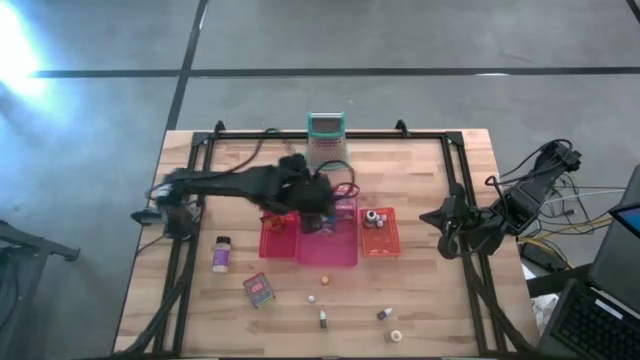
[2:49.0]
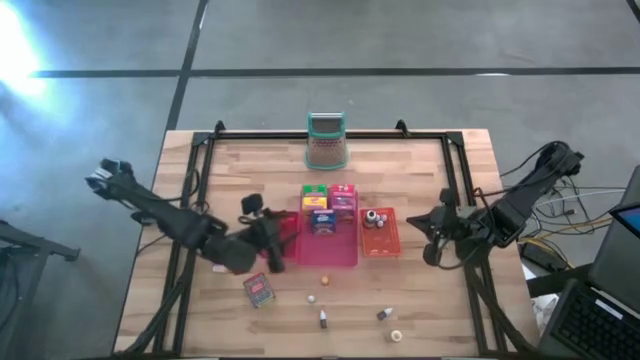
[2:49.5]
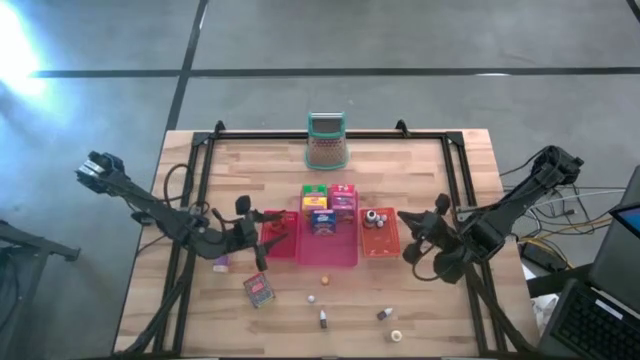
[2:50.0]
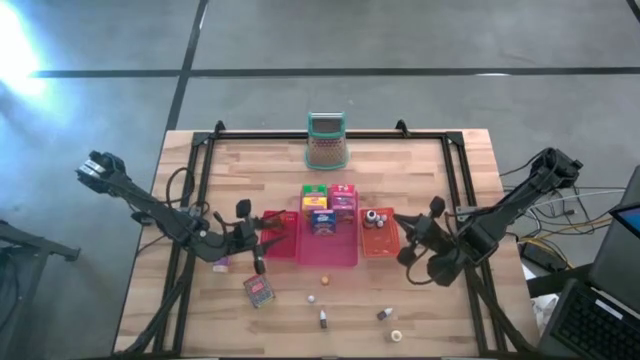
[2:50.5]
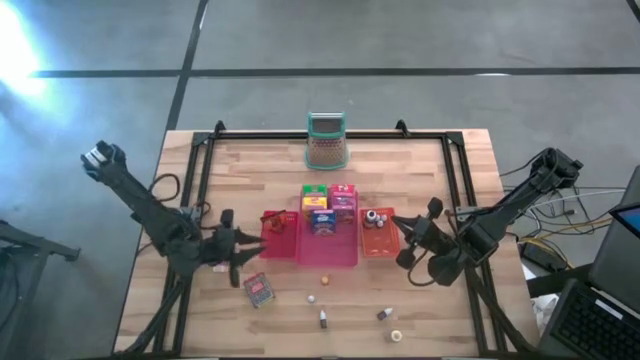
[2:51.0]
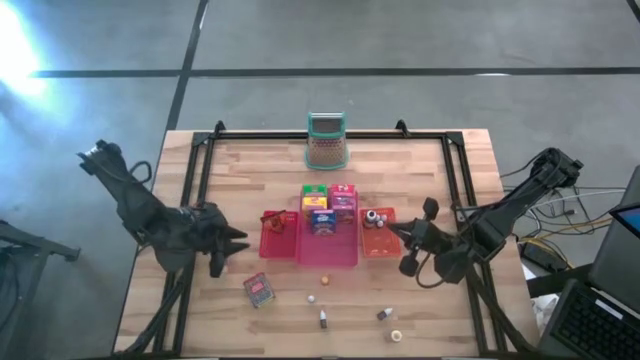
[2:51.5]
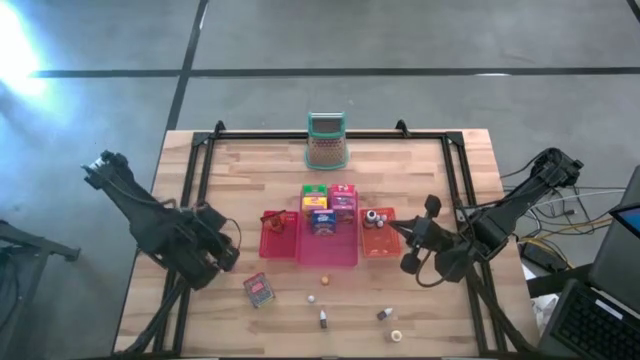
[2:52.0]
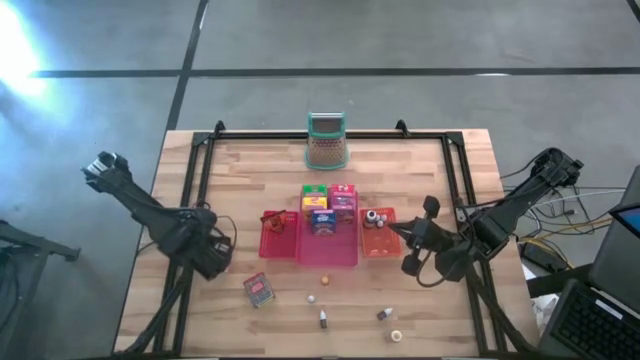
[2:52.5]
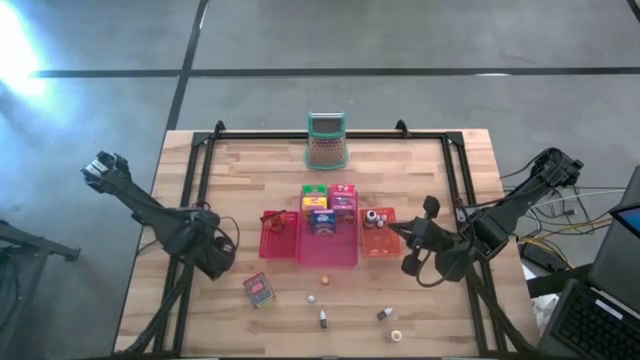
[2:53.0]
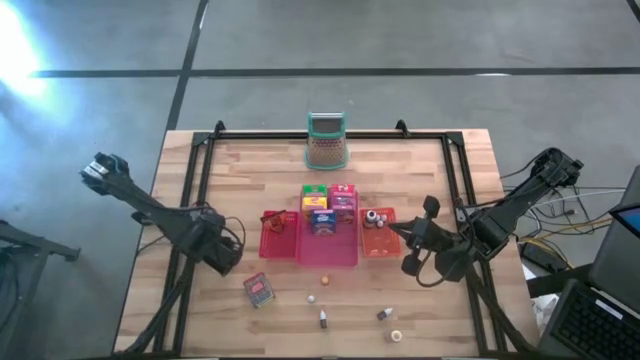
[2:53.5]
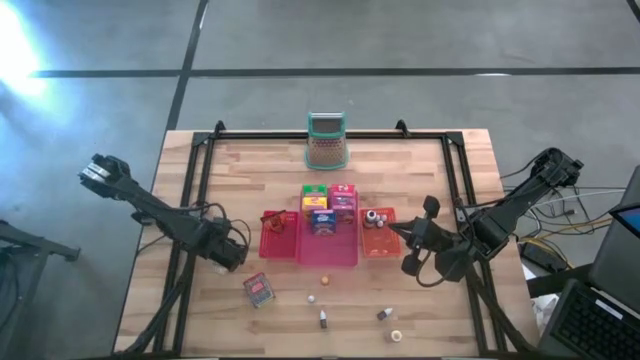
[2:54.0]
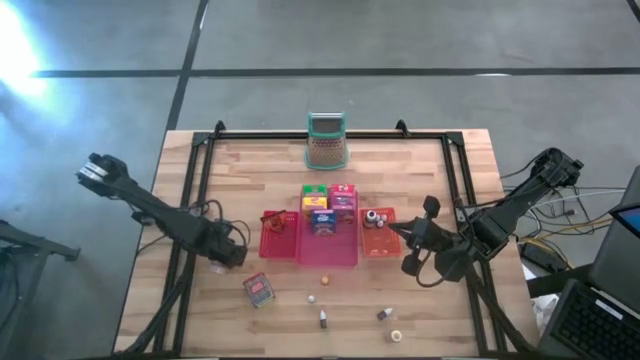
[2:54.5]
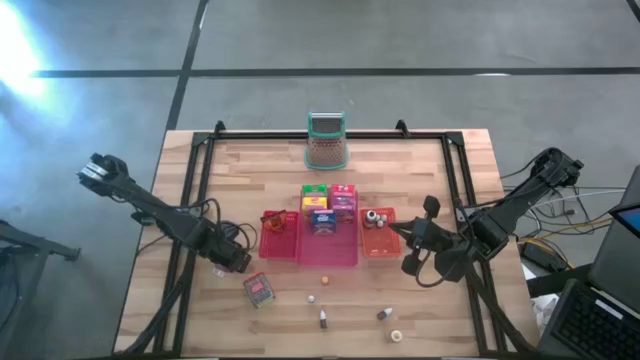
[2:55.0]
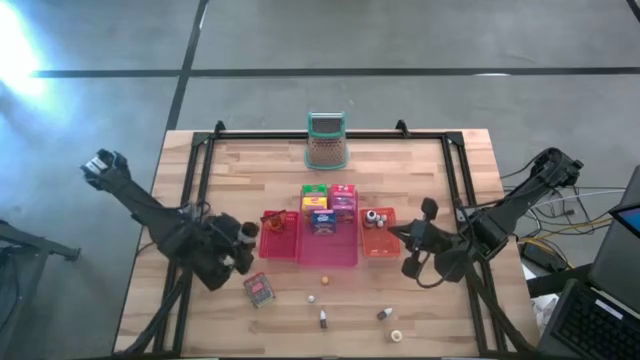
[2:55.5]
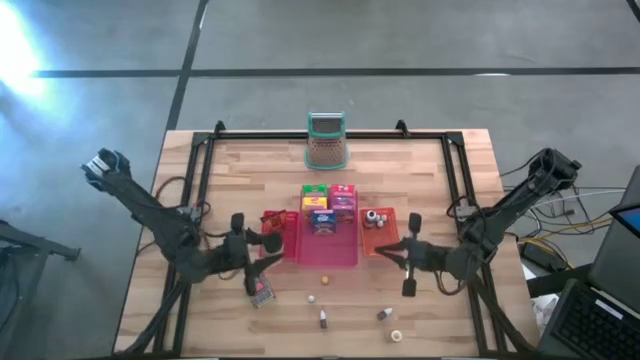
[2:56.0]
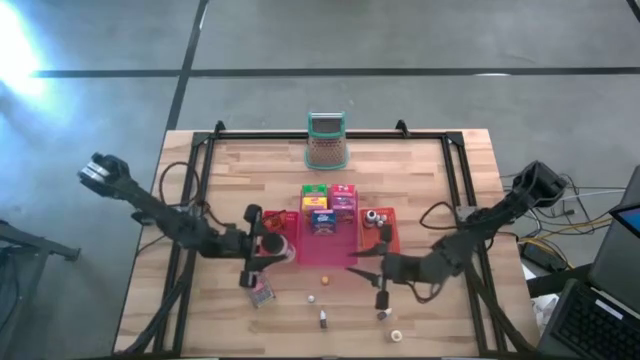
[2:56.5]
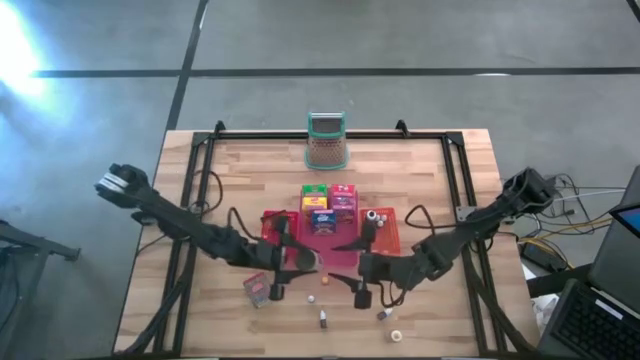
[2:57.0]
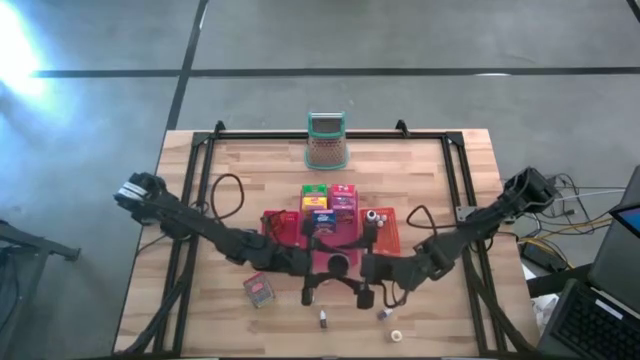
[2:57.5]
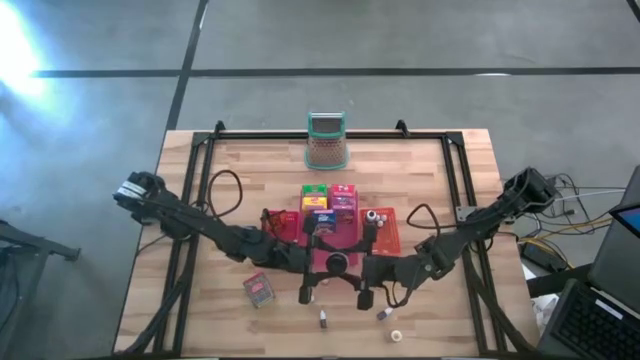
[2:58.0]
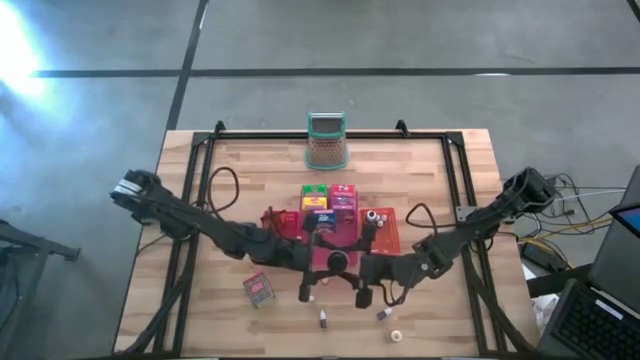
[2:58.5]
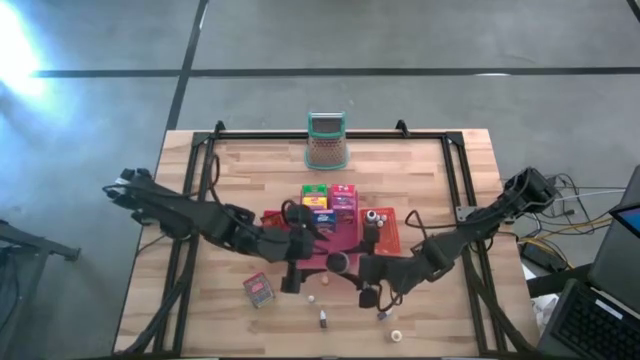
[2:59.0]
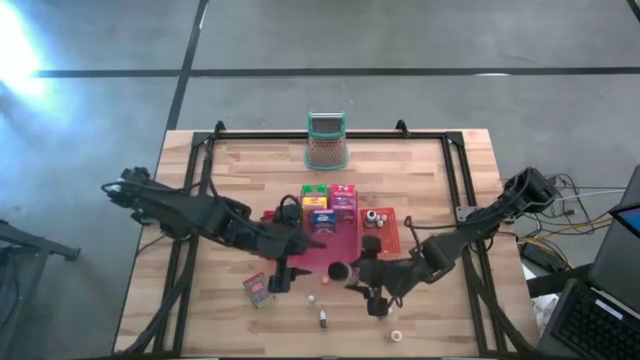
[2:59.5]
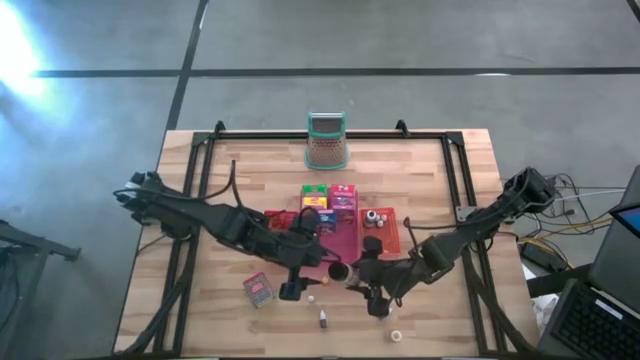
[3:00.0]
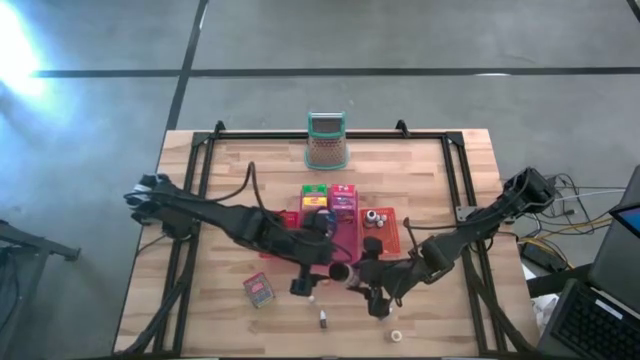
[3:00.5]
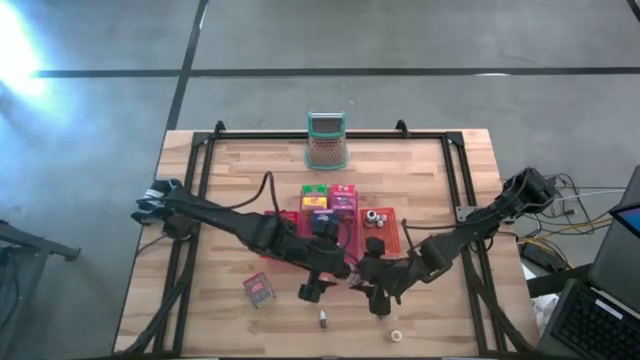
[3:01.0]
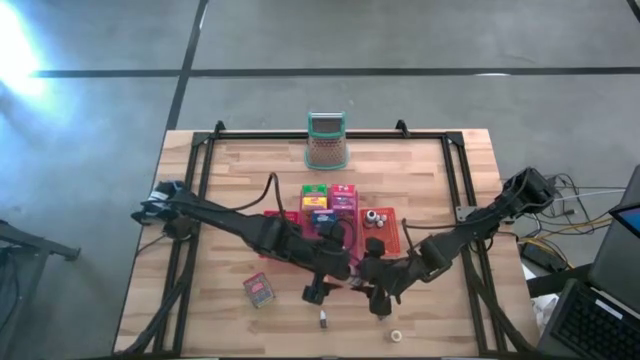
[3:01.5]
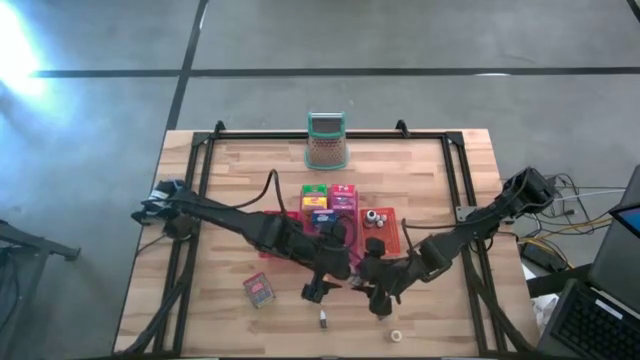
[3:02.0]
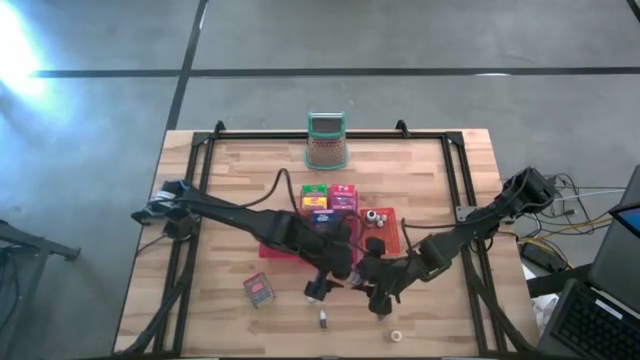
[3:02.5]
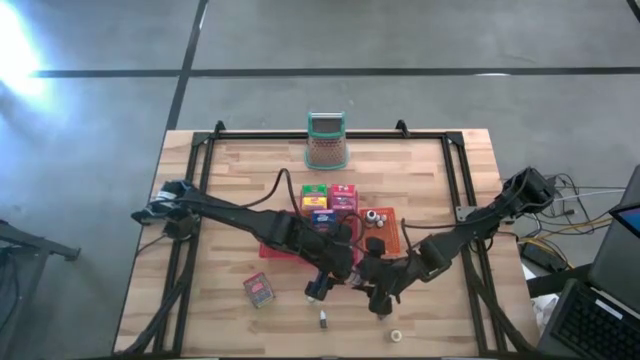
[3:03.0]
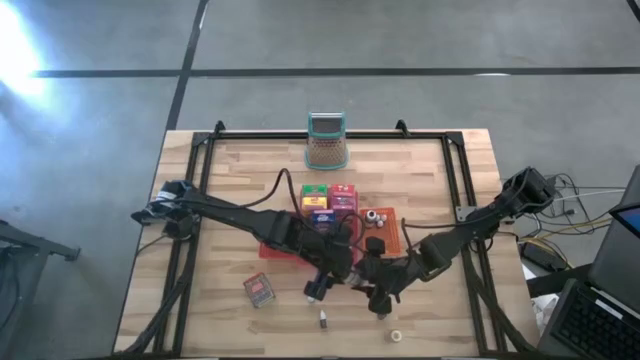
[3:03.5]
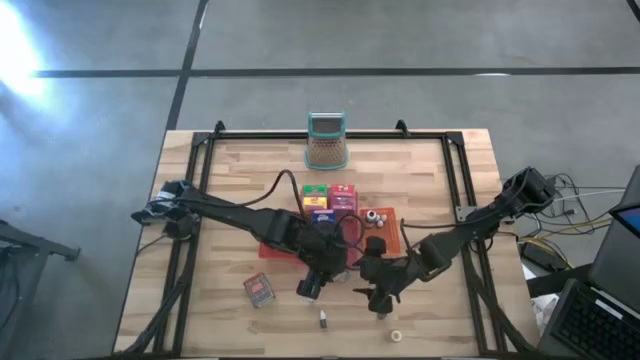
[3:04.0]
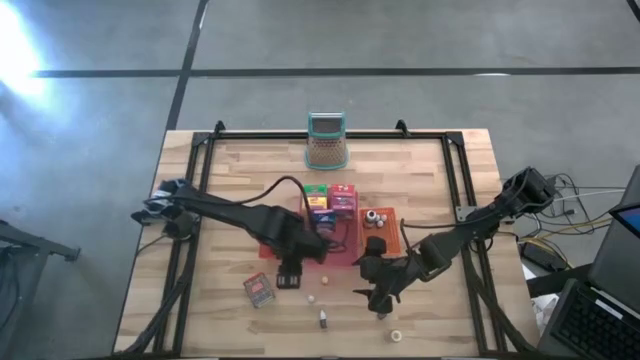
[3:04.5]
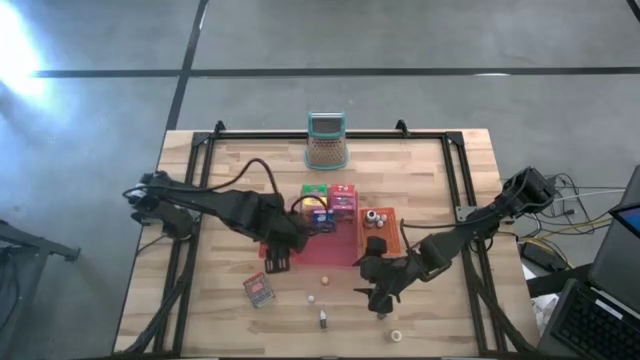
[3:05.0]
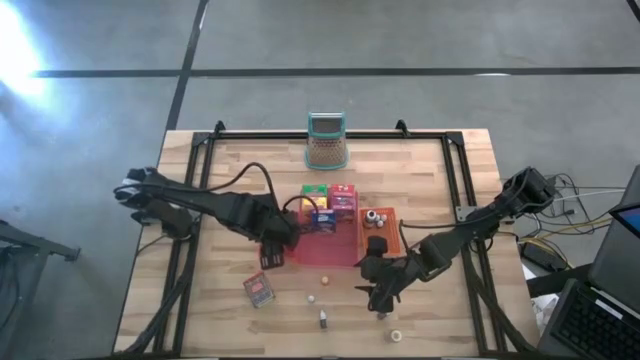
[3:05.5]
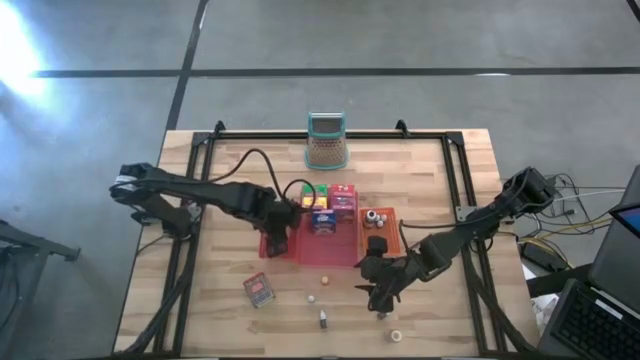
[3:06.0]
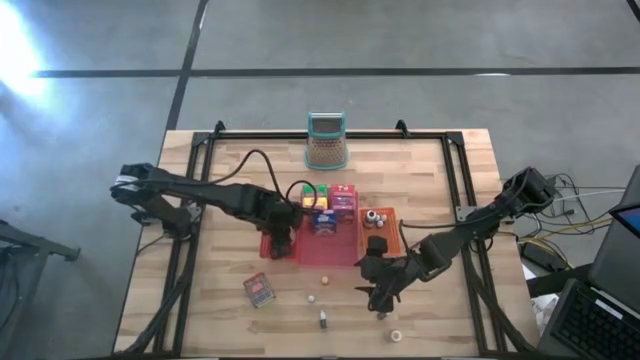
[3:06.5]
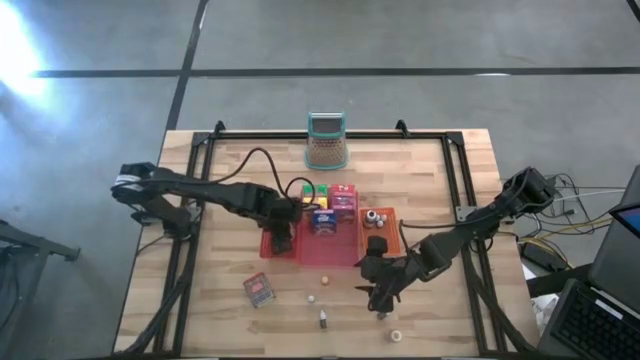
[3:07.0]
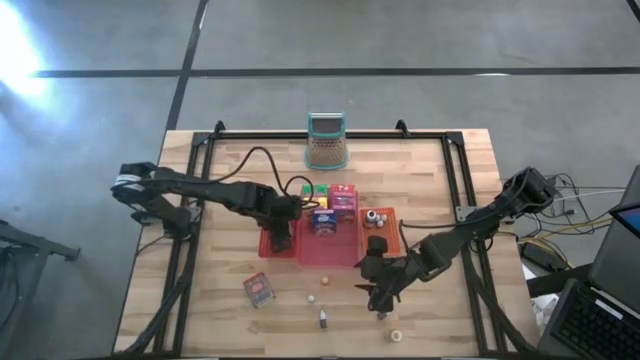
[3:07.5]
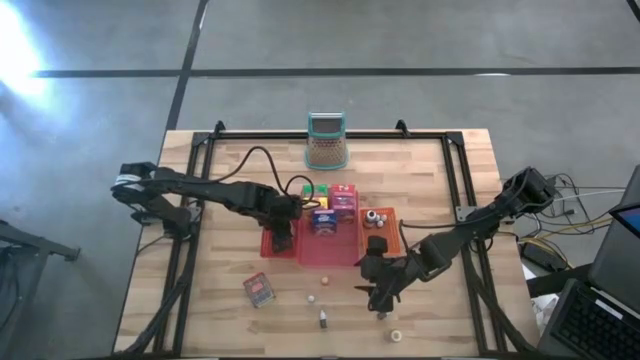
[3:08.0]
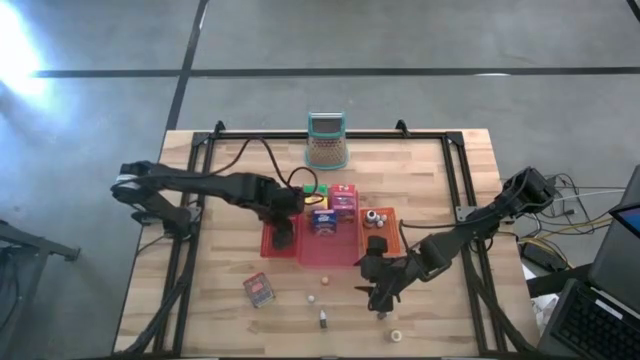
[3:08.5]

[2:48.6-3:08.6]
Task: Pick & Place Kitchen Items
Put the black purple seasoning bottle into the red bin

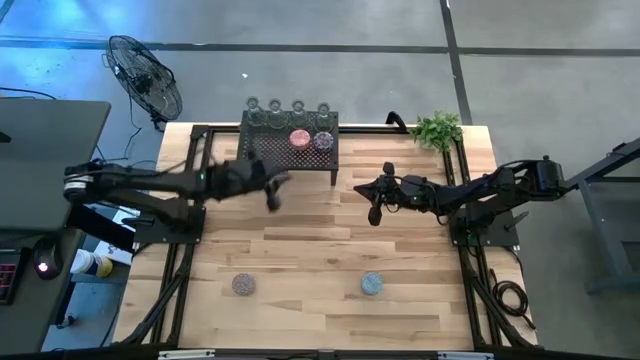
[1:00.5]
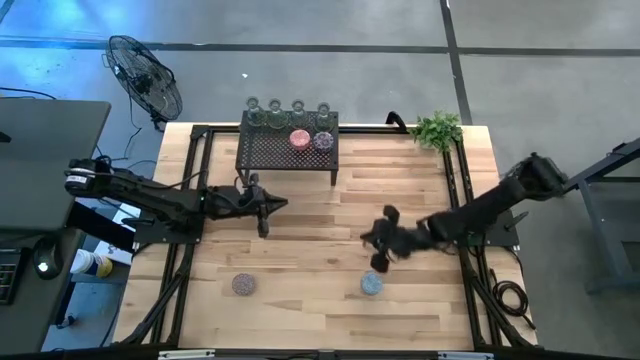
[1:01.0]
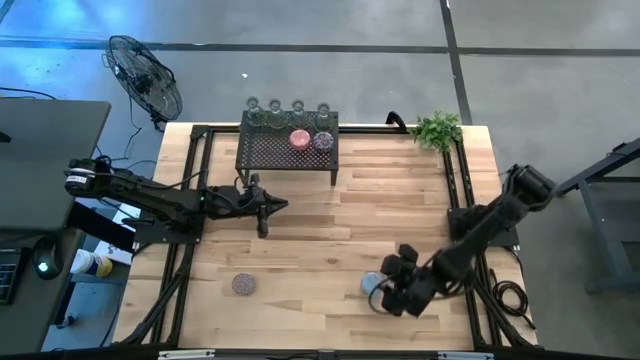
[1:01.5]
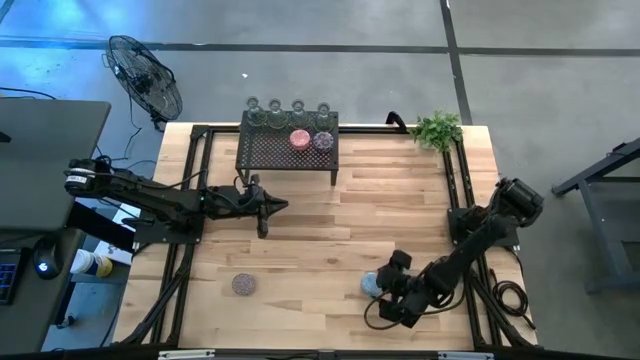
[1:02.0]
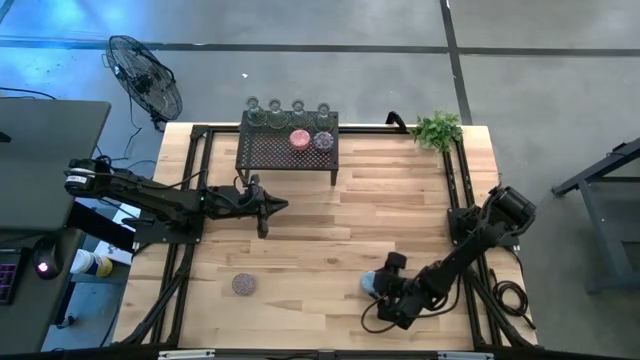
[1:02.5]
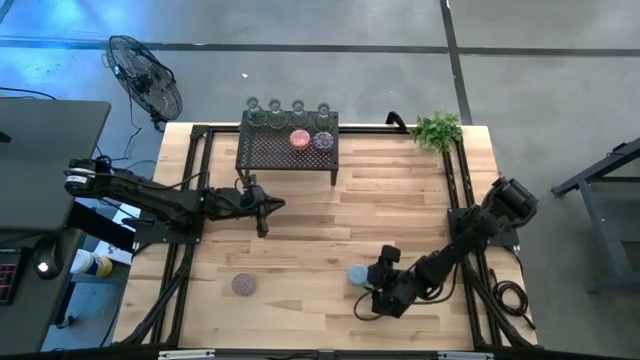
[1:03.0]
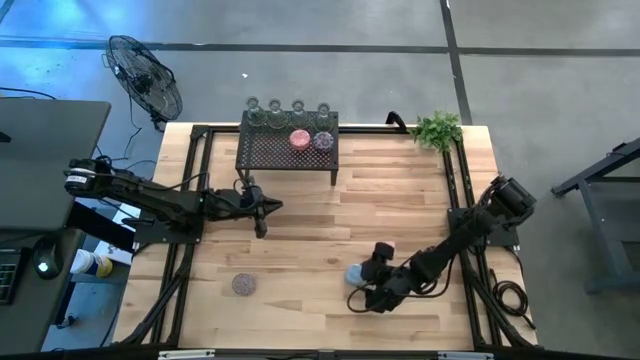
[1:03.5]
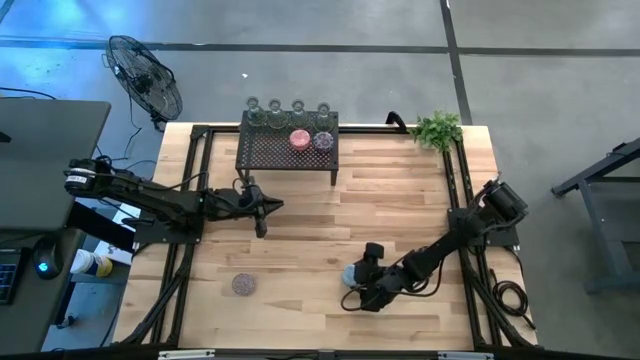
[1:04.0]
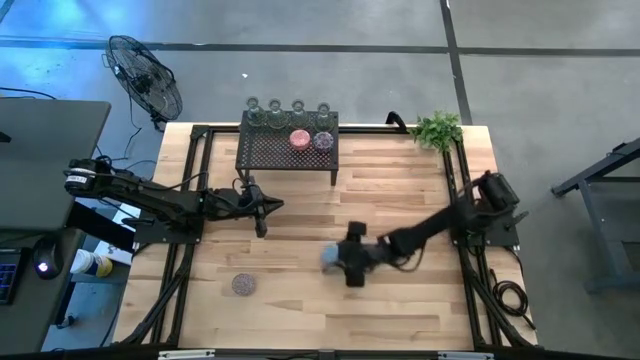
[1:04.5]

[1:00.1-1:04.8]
Task: Pick & Place candle stick holders
Put the blue scented candle on the shelf
